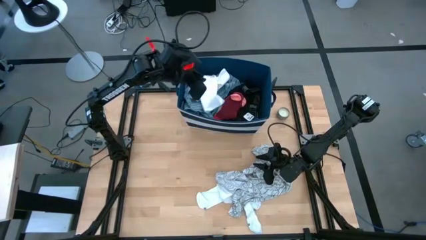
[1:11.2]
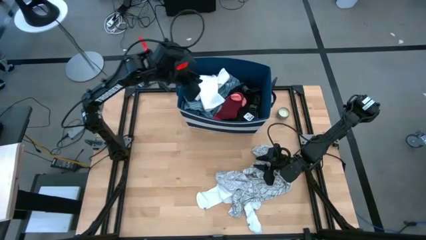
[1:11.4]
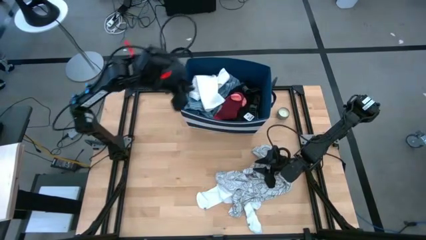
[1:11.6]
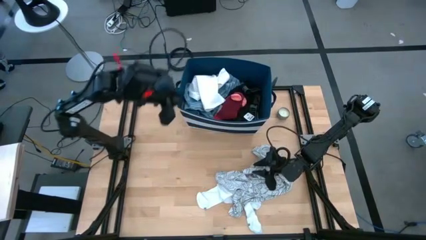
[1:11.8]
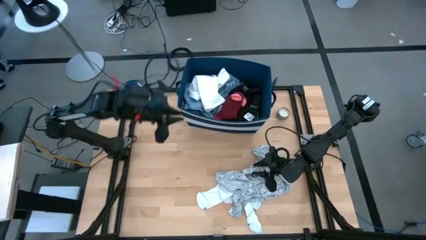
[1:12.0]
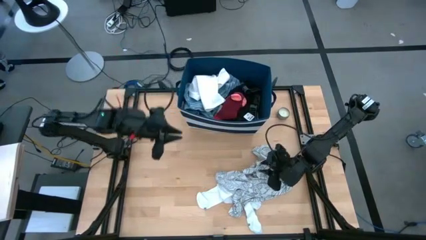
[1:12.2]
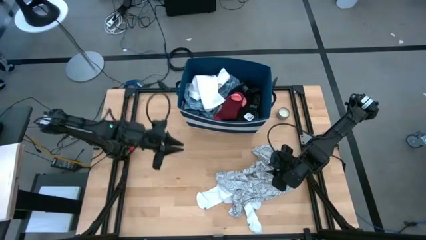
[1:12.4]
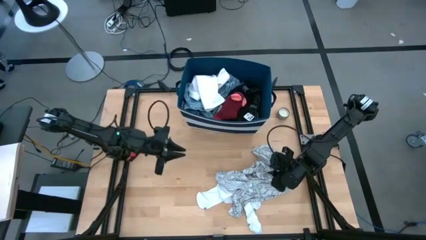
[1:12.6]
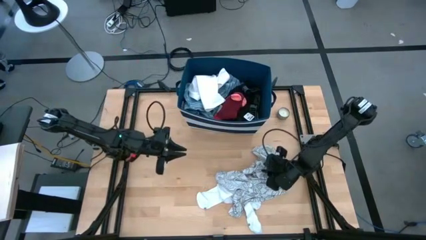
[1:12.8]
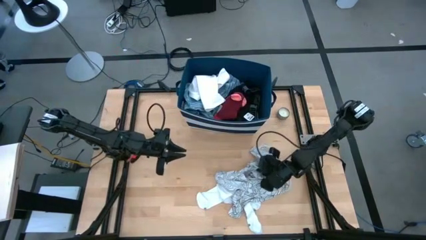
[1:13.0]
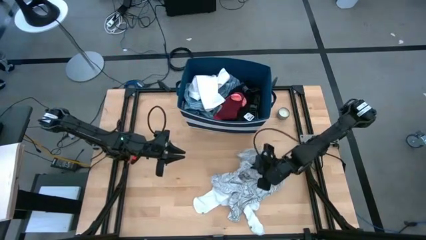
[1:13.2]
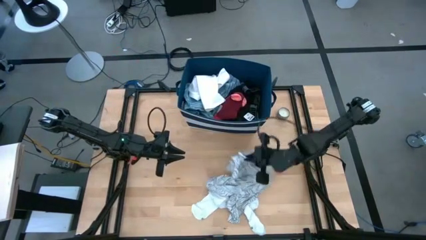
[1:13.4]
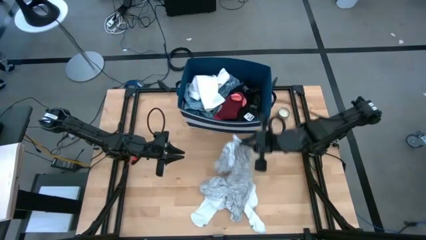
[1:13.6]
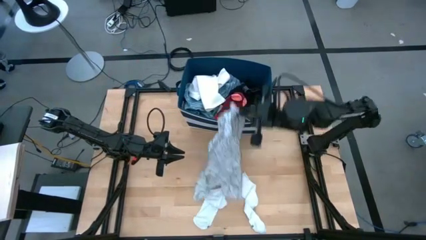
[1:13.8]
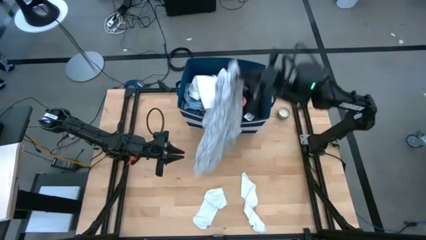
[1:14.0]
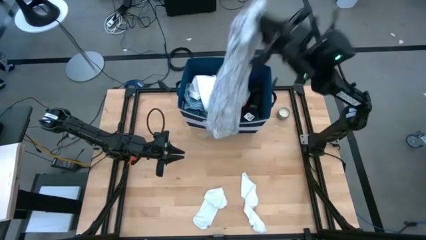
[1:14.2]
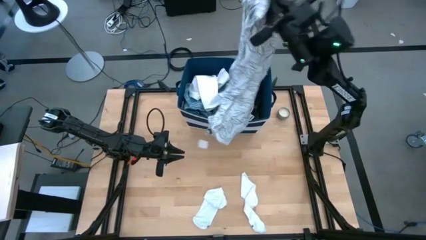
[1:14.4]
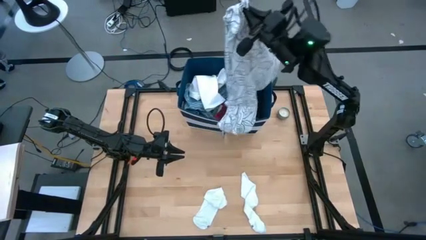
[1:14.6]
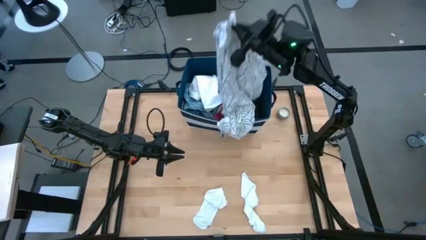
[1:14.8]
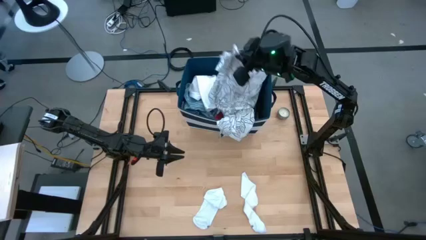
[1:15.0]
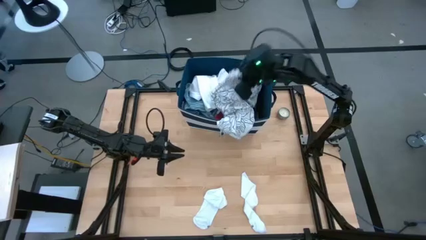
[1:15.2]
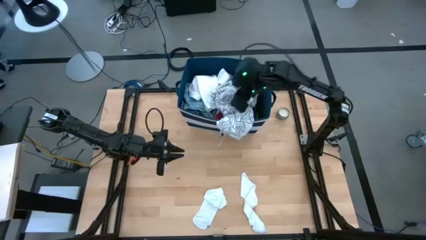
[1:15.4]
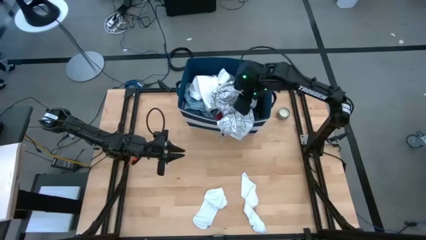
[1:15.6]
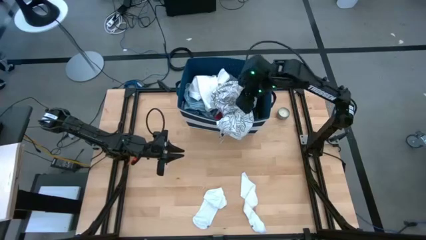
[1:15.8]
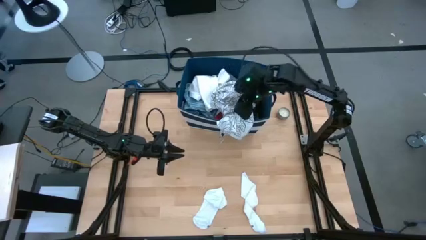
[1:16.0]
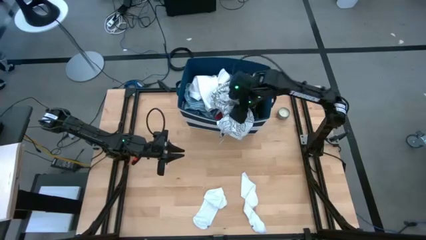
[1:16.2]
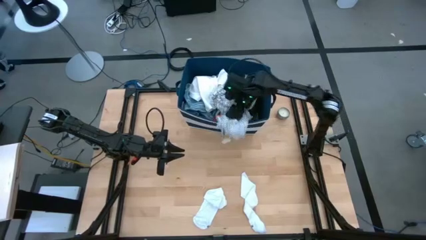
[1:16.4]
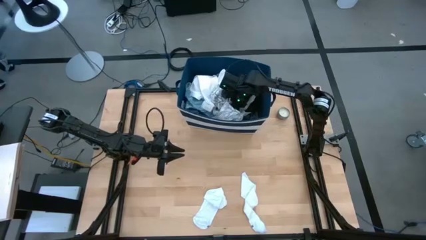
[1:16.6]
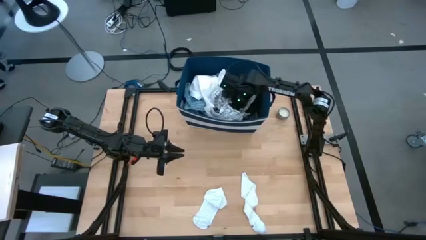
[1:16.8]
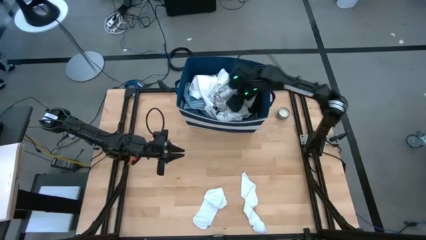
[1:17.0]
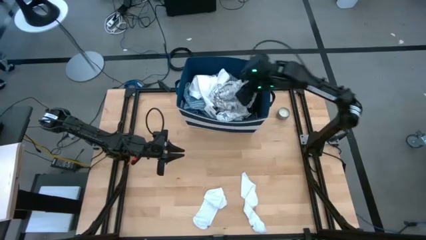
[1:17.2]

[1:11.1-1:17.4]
Task: Sort clothes
Put the white pattern shirt into the blue laundry bin

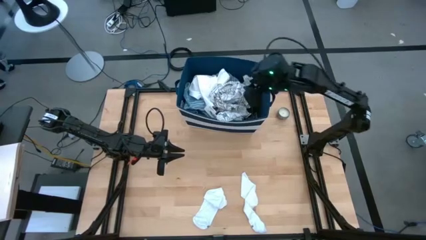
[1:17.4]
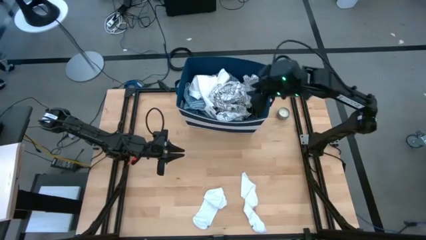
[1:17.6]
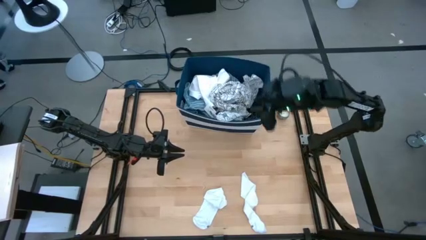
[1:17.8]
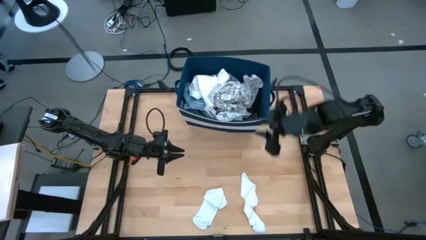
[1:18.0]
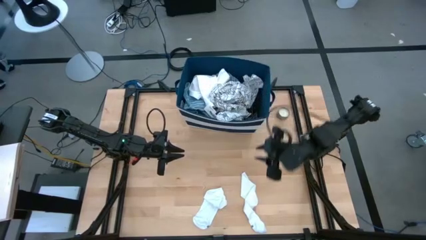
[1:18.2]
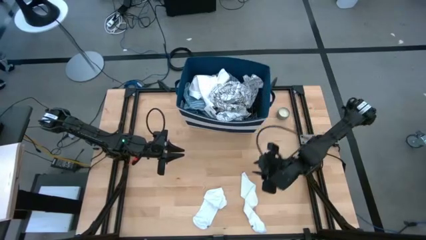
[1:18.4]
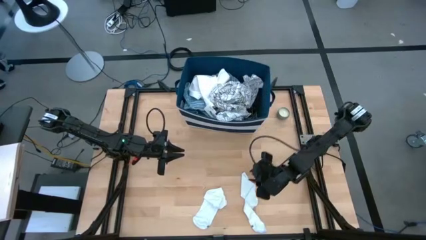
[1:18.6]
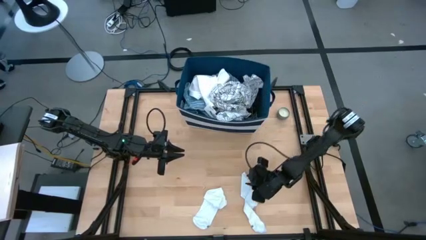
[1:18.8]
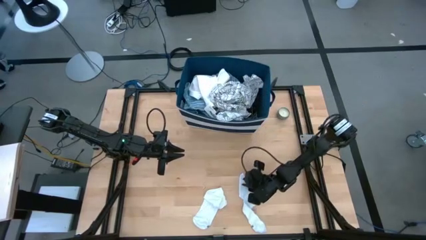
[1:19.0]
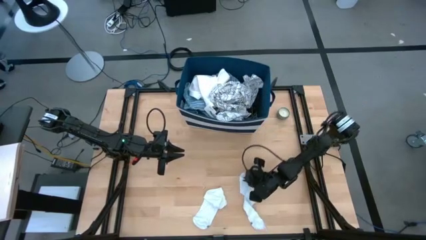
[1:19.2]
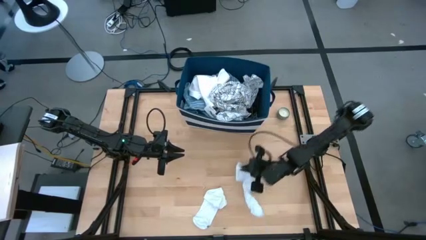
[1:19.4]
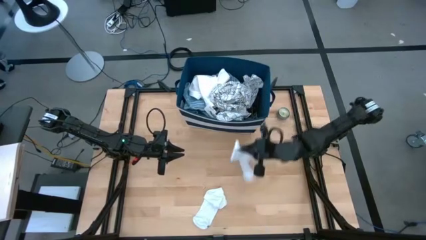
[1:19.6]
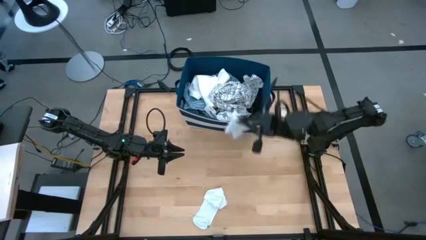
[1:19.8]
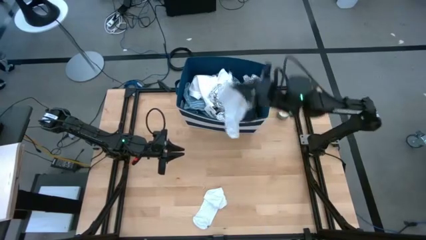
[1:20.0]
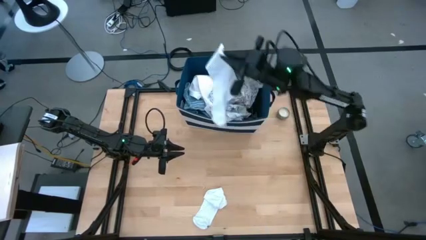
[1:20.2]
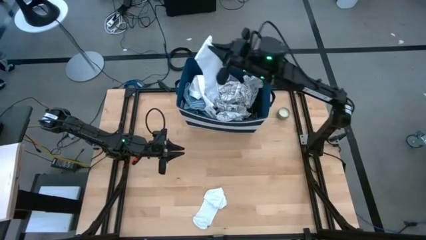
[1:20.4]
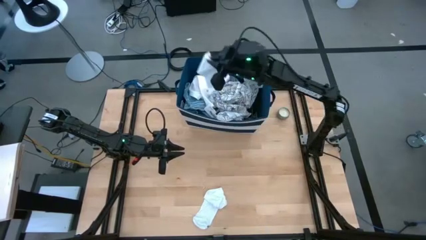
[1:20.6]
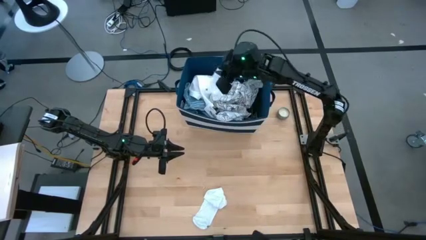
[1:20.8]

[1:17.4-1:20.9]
Put the right white sock into the blue laundry bin

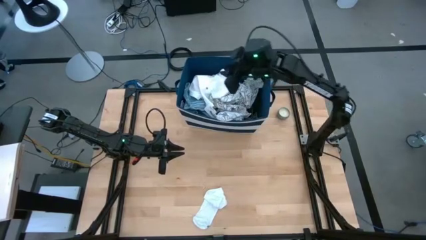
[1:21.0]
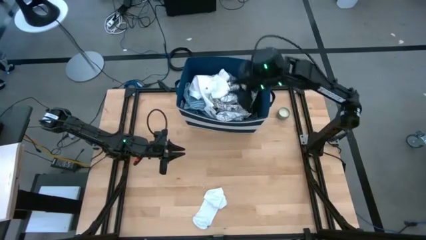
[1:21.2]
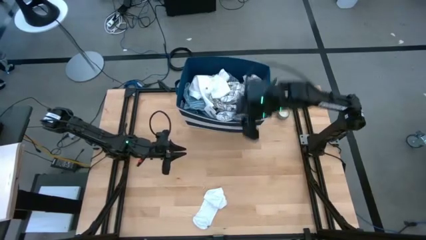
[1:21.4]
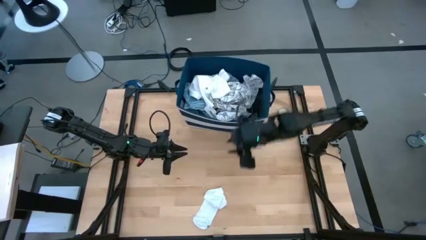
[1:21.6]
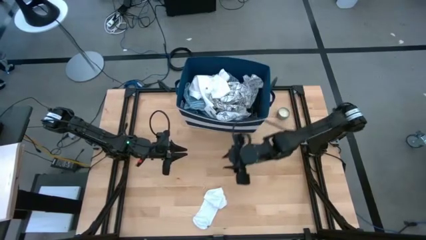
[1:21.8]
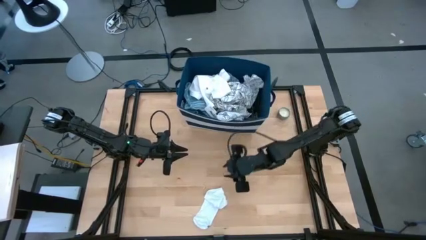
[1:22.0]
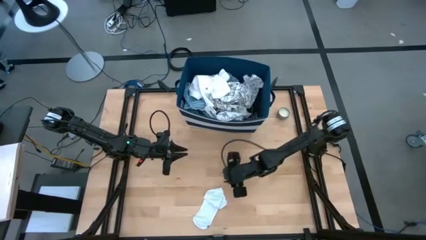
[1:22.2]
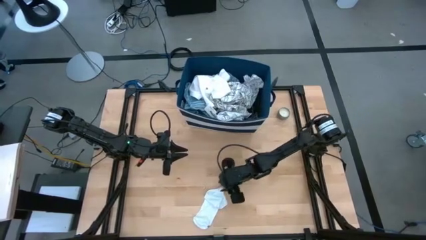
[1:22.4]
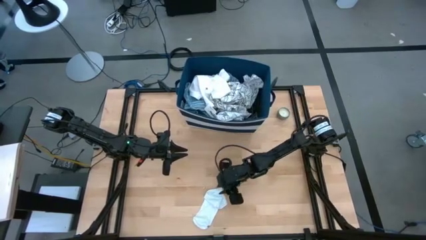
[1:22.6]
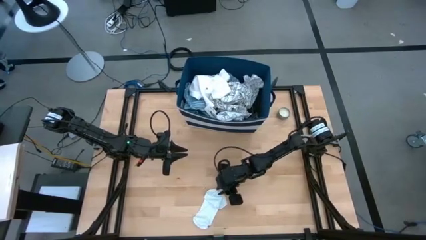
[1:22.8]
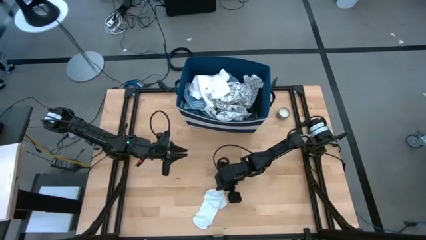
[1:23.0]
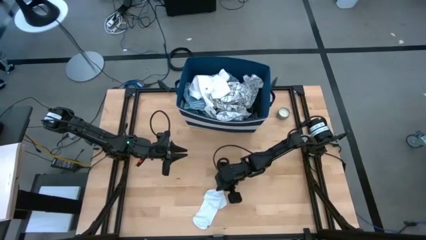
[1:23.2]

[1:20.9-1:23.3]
Put the white sock into the blue bin

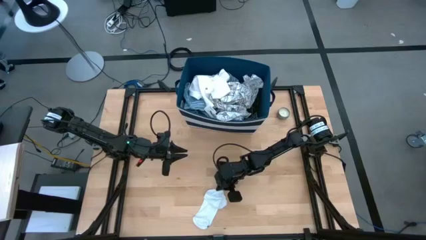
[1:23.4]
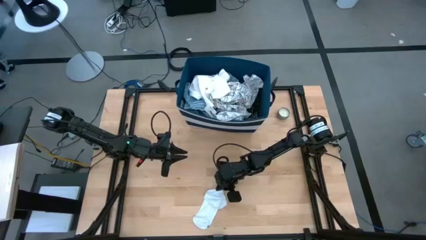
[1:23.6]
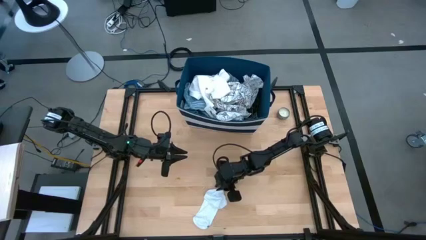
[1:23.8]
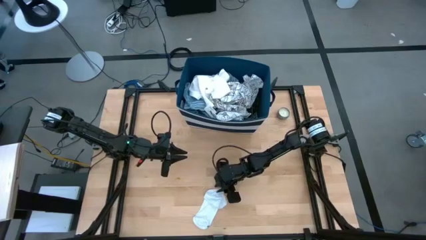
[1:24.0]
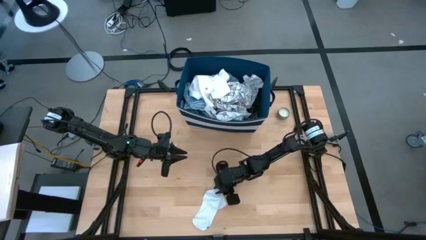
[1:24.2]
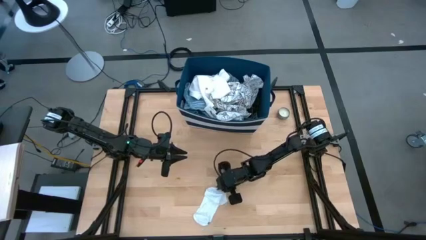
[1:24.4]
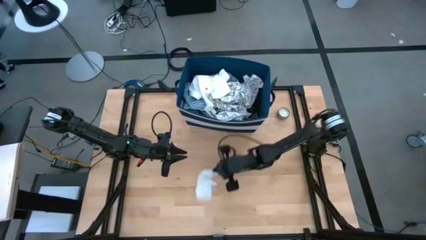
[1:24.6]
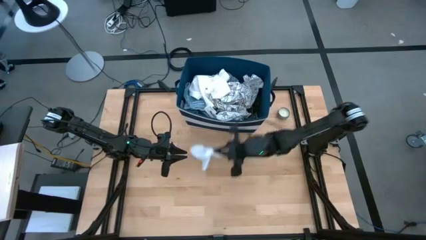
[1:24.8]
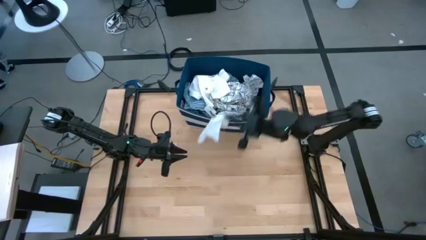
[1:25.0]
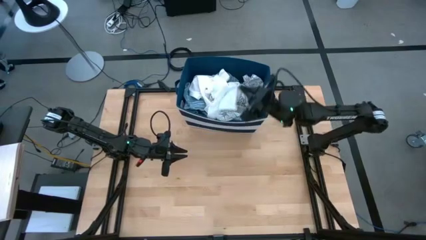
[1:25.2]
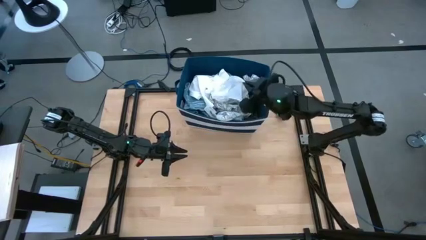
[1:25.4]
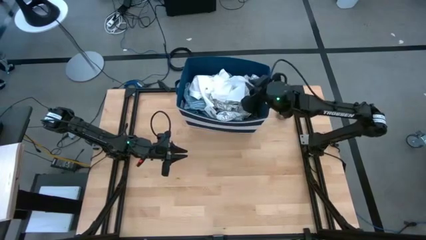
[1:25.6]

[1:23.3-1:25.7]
Put the white sock into the blue laundry bin

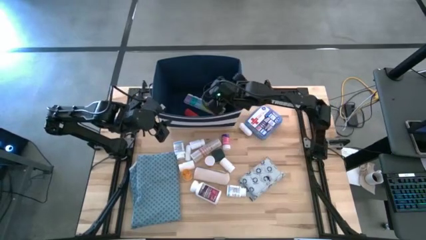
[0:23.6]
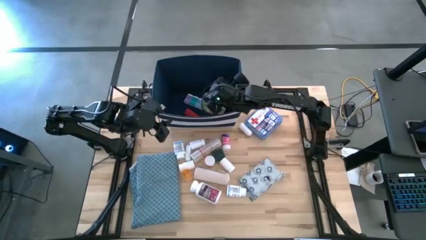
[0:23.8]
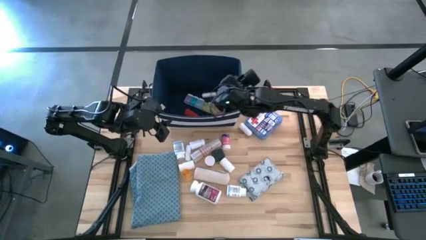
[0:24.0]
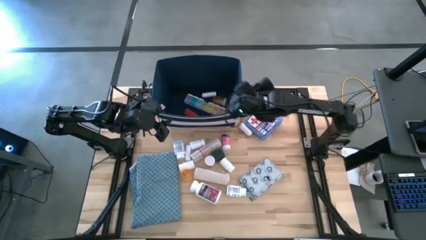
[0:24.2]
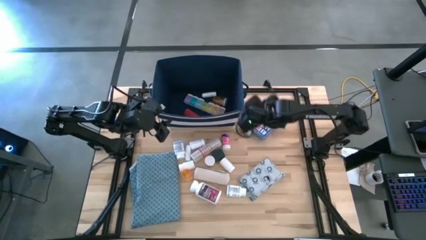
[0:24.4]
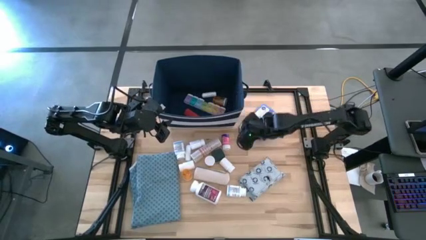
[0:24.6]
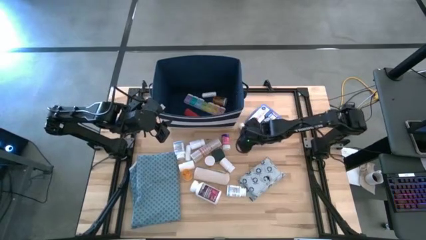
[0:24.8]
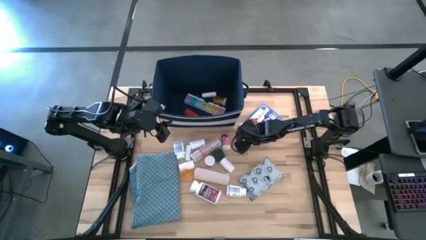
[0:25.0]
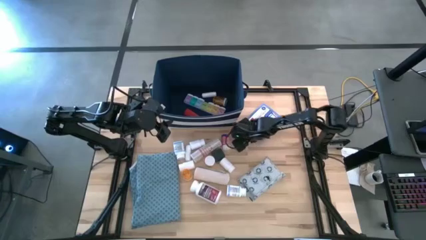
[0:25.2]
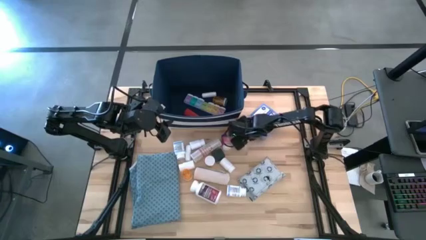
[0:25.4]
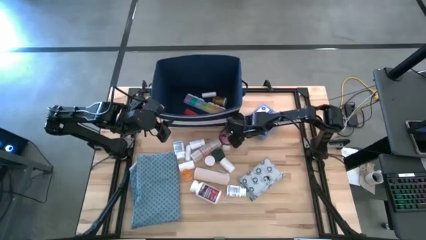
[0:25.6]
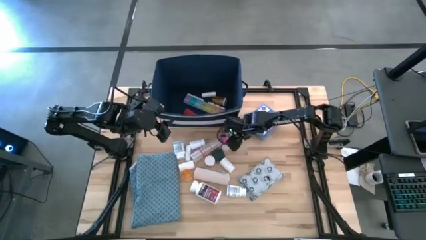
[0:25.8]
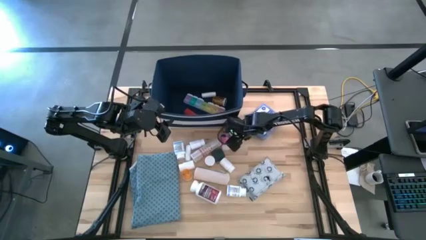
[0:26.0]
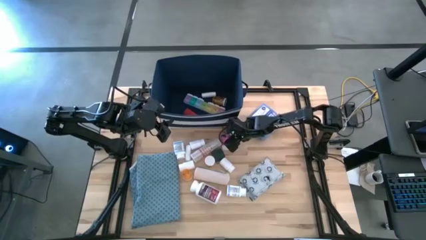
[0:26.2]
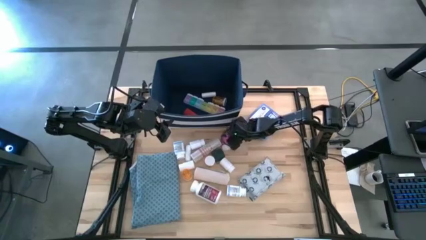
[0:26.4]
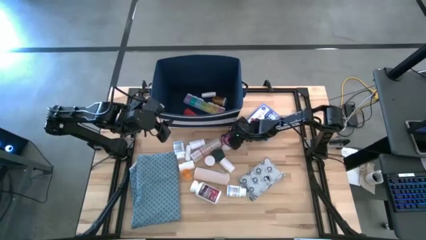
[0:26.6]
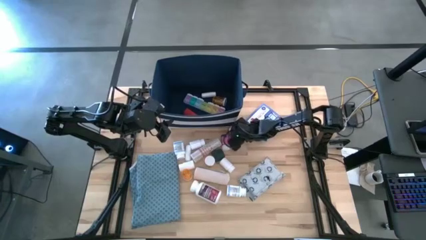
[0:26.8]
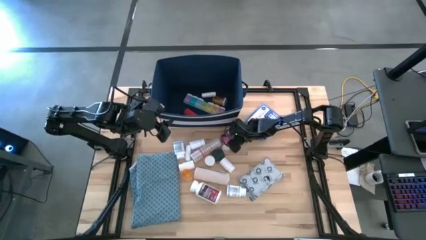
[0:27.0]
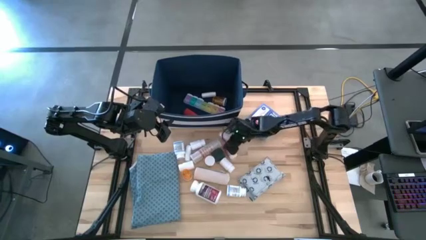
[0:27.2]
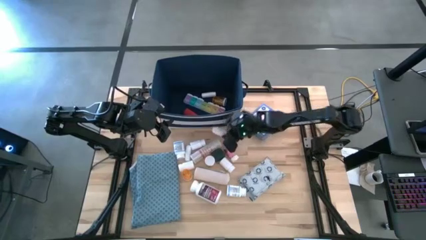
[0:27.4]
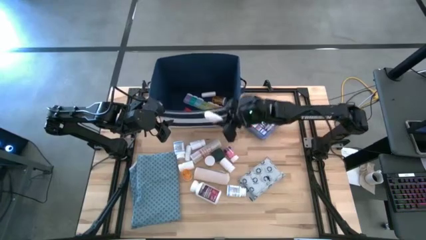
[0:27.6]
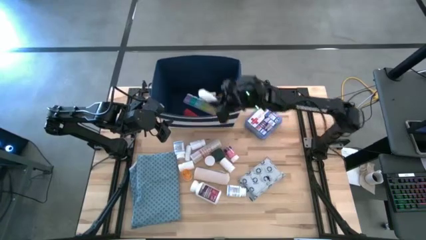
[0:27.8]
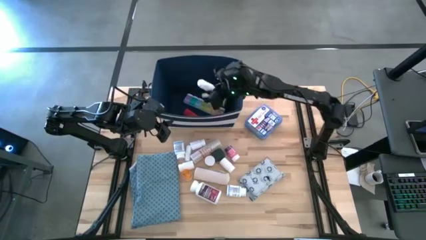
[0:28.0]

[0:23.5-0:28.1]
Task: Pick & place medical supplies in basket/bin
Put the white rolled gauze into the blue bin
